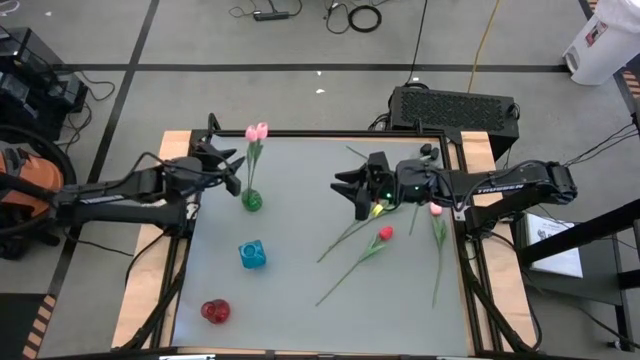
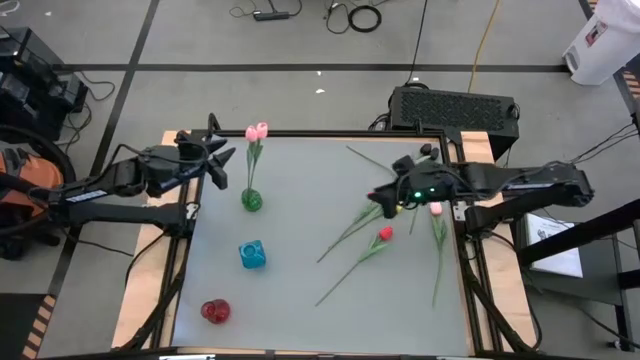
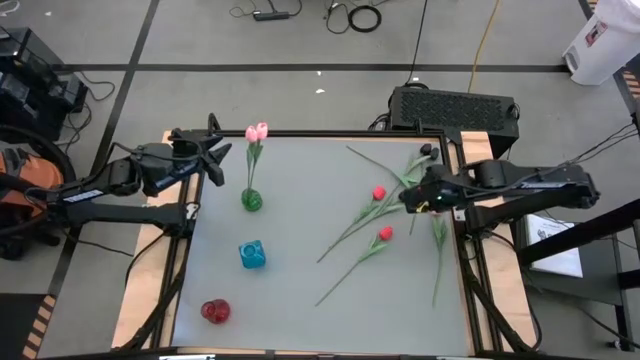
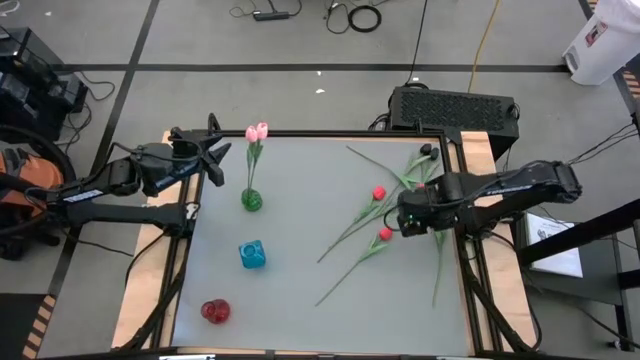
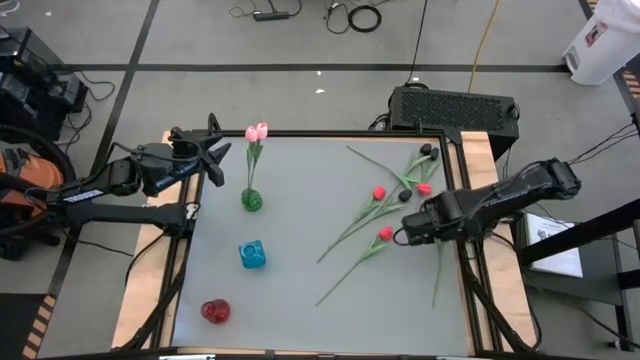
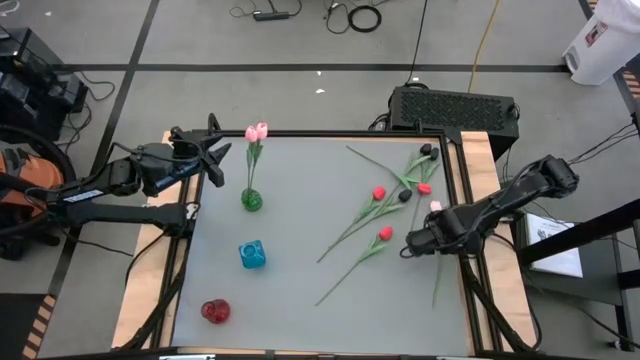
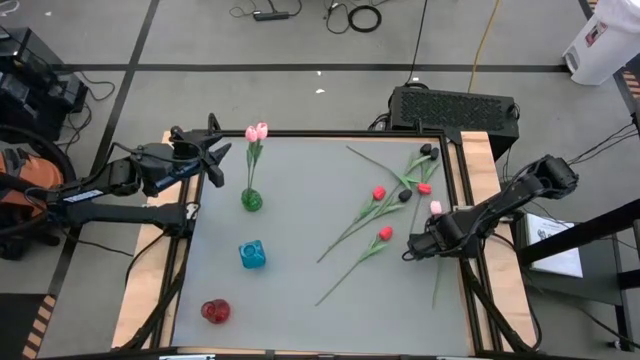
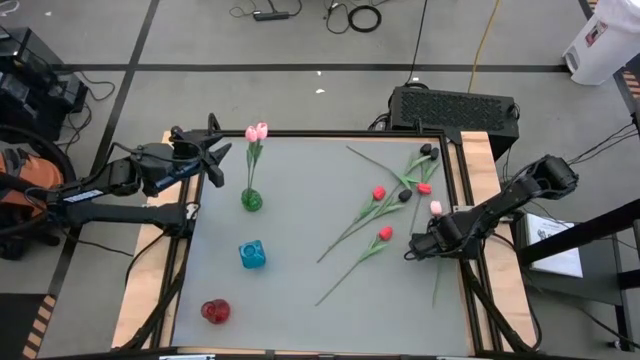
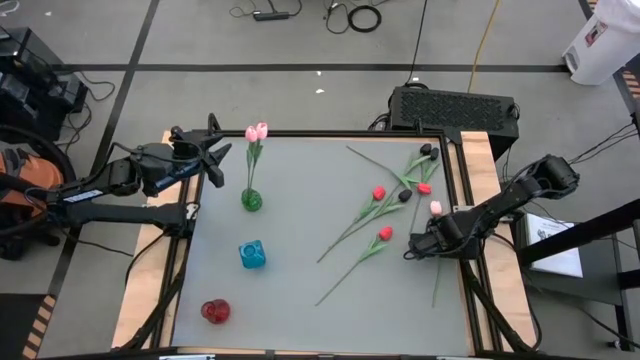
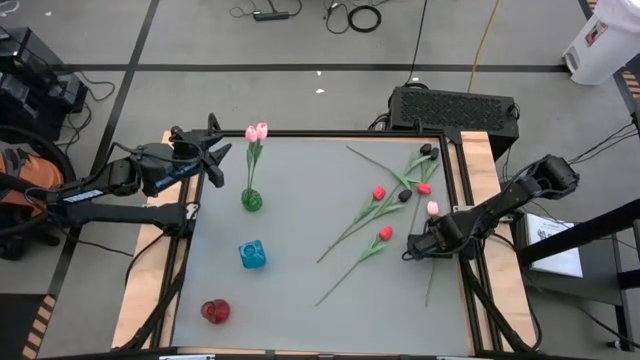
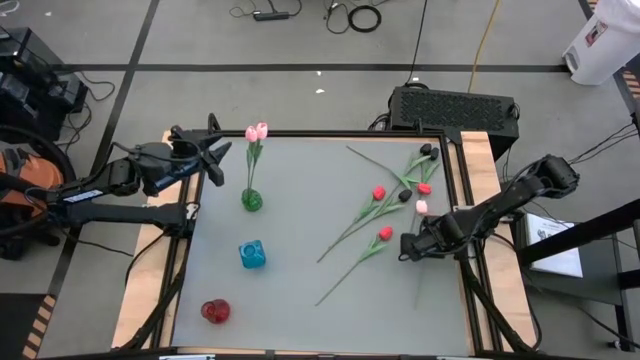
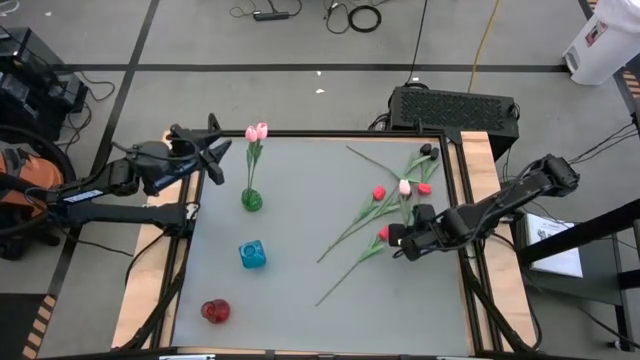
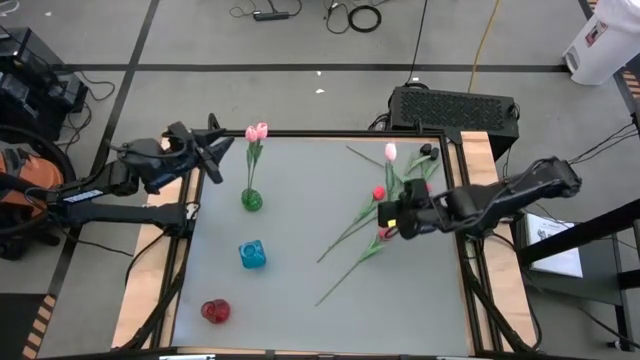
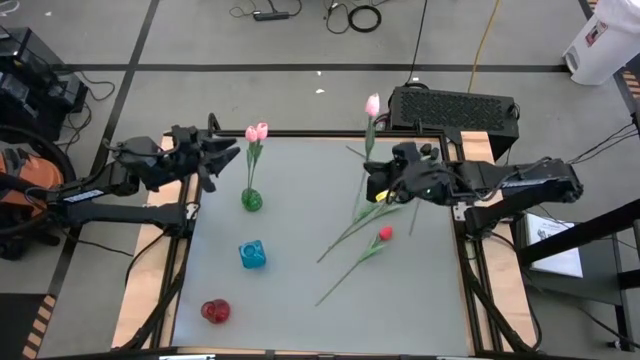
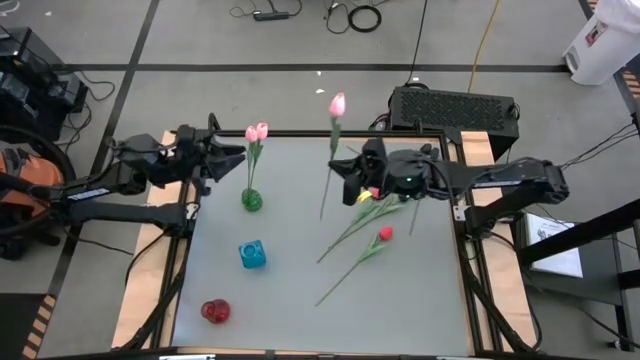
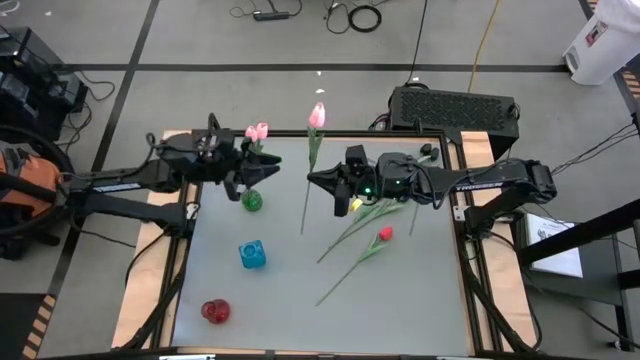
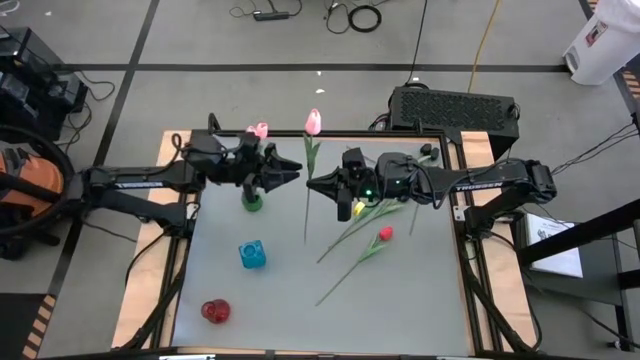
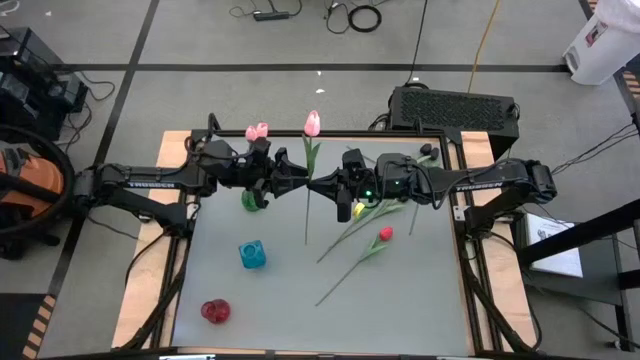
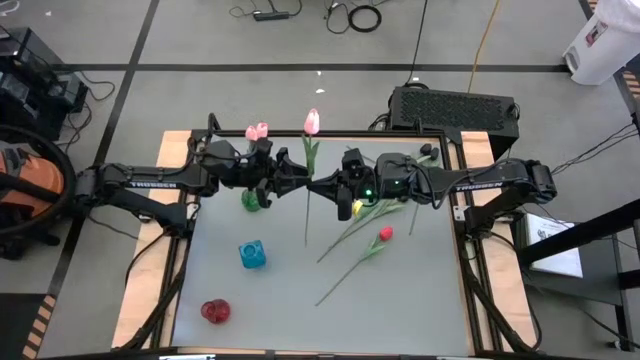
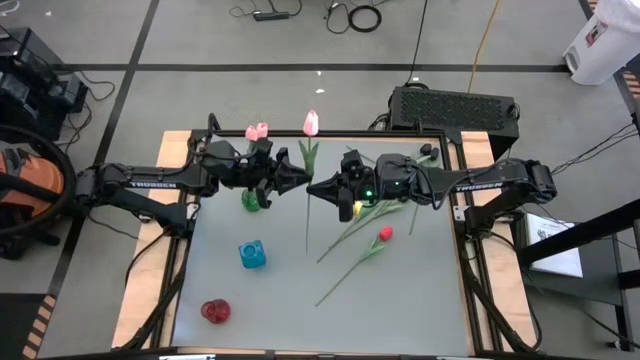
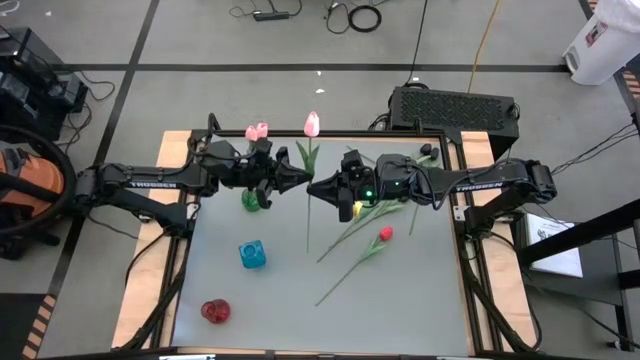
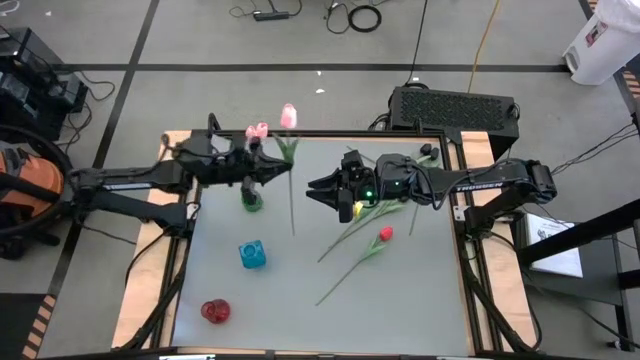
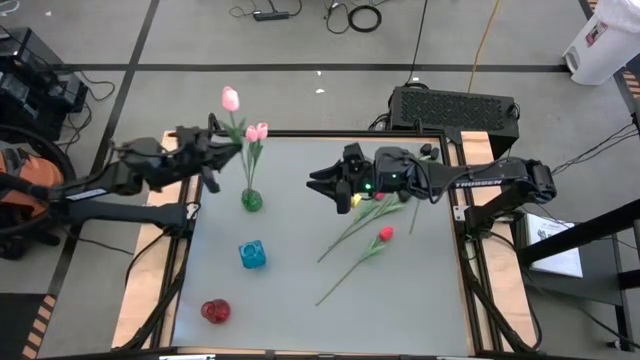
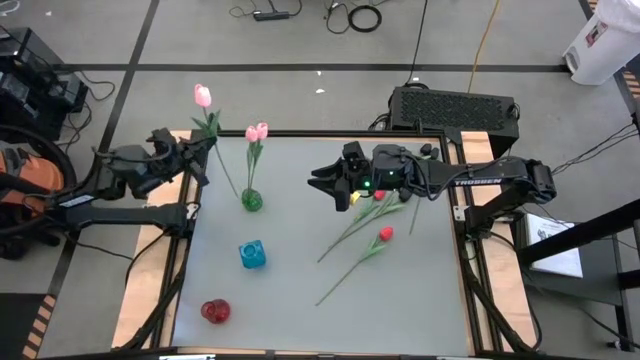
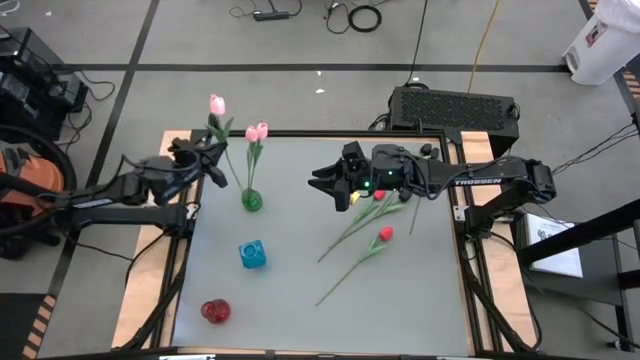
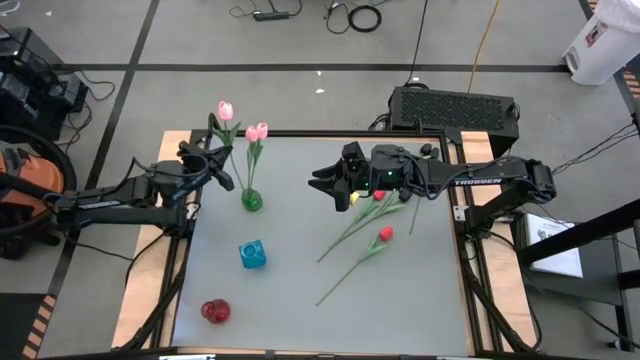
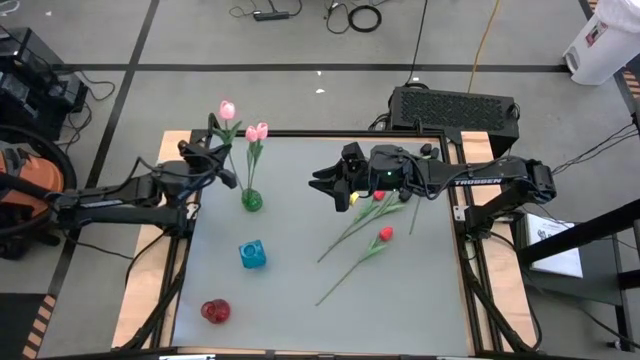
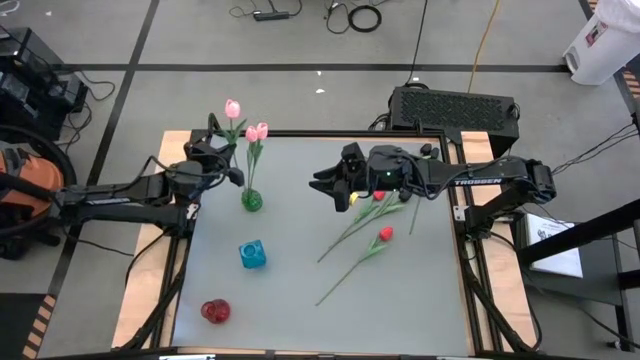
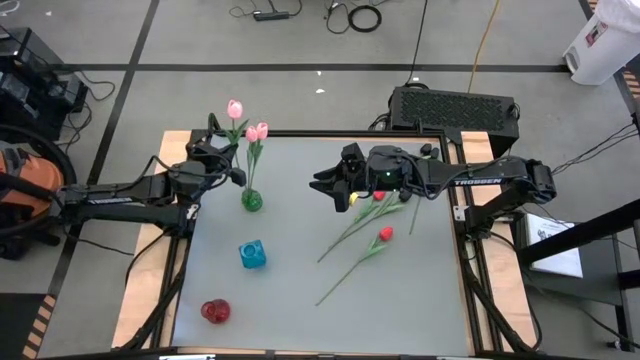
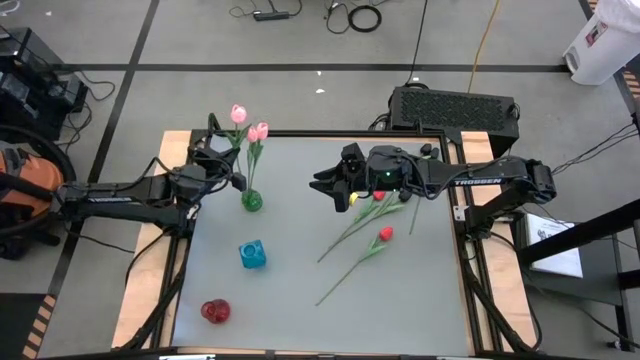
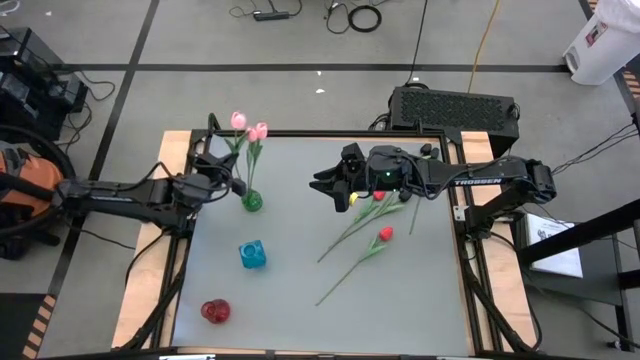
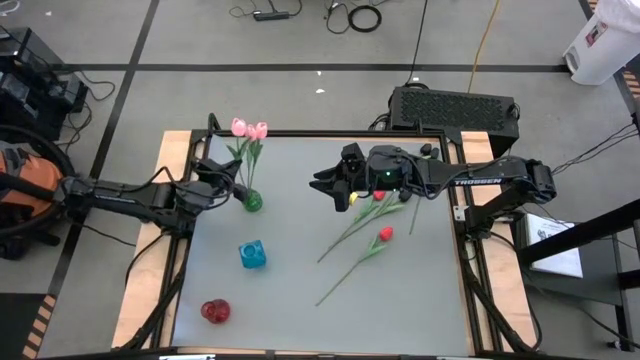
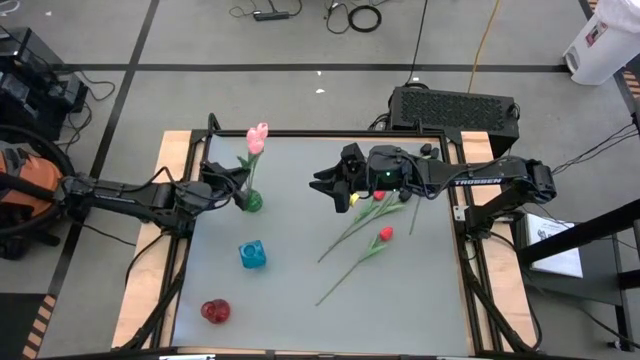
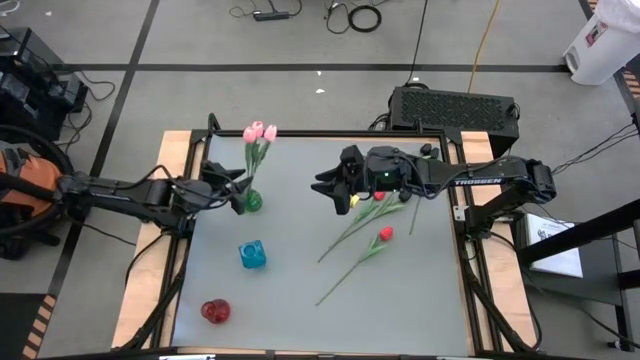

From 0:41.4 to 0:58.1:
Task: Sort flowers into vase by color
Put the pink flower into the green vase
